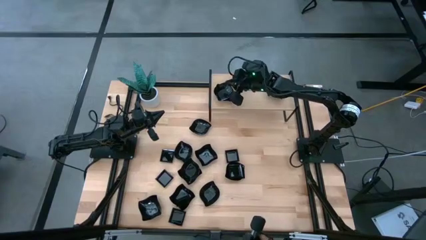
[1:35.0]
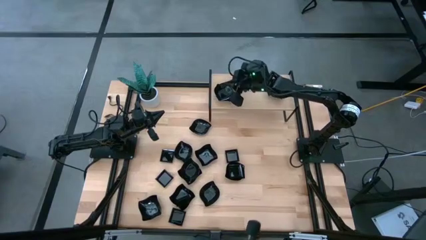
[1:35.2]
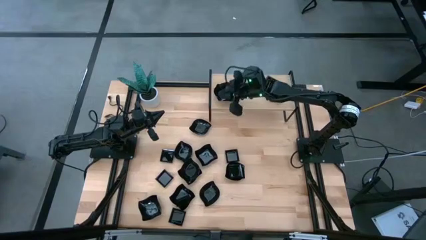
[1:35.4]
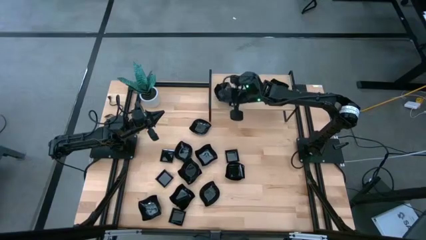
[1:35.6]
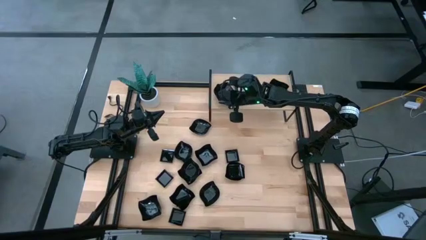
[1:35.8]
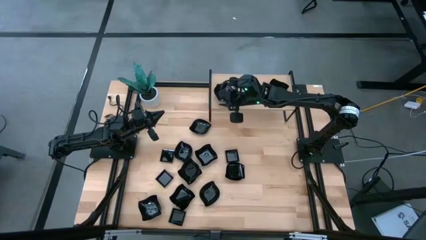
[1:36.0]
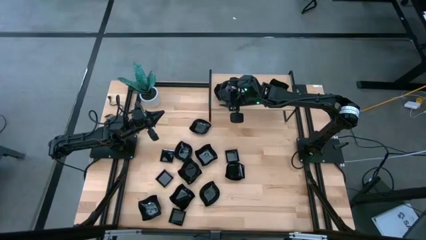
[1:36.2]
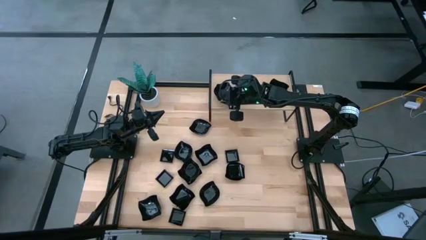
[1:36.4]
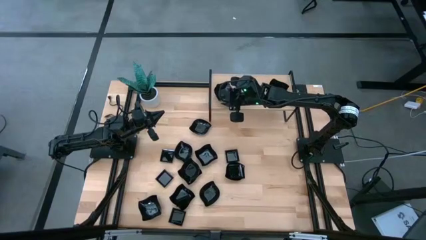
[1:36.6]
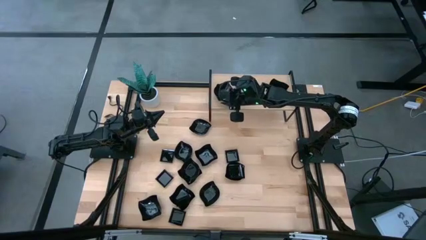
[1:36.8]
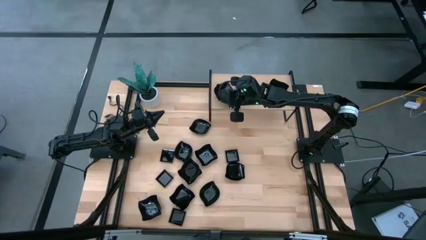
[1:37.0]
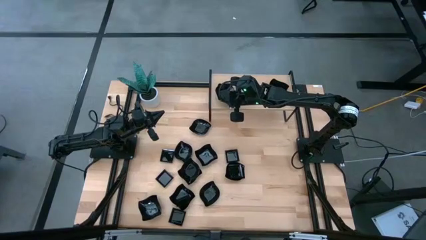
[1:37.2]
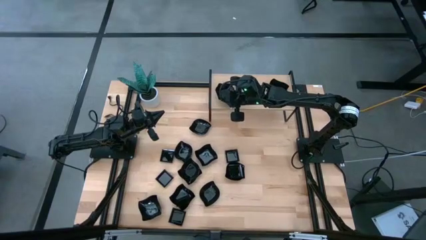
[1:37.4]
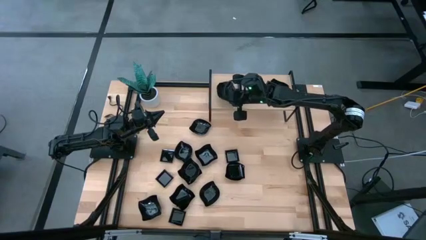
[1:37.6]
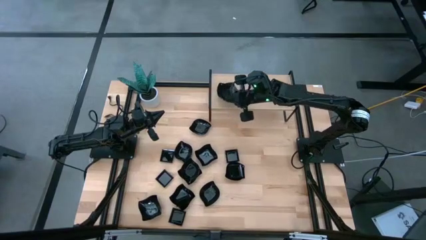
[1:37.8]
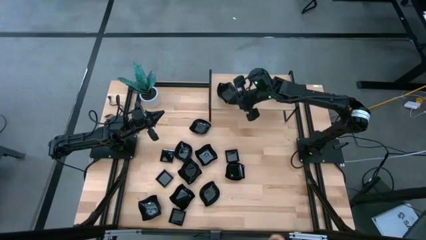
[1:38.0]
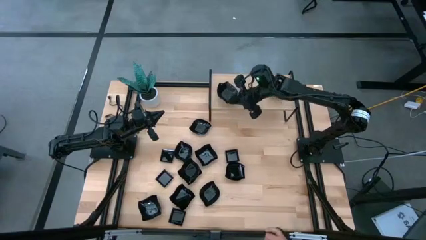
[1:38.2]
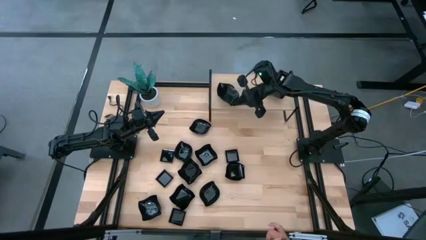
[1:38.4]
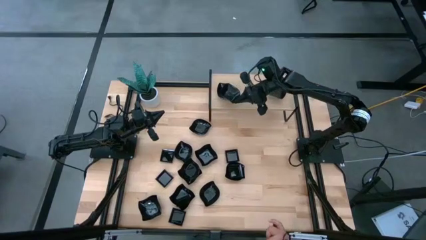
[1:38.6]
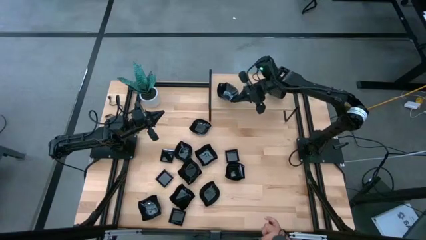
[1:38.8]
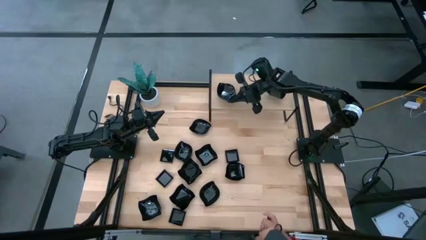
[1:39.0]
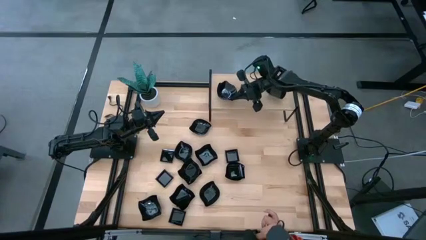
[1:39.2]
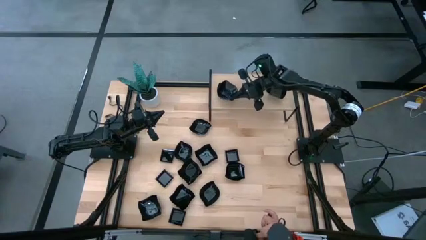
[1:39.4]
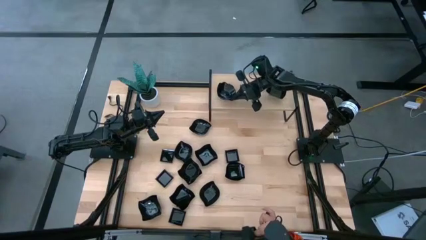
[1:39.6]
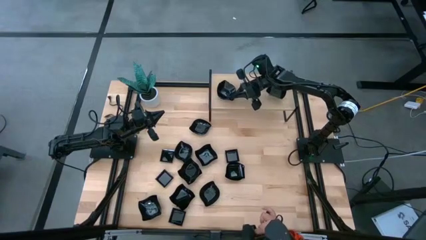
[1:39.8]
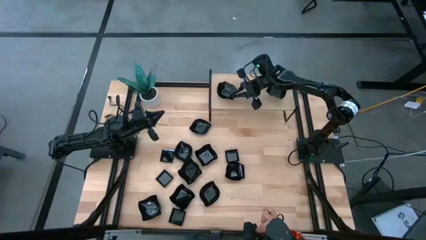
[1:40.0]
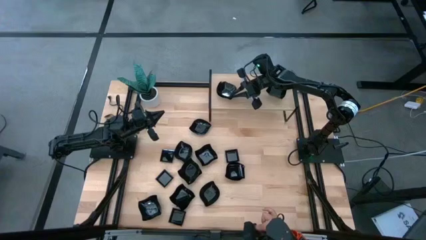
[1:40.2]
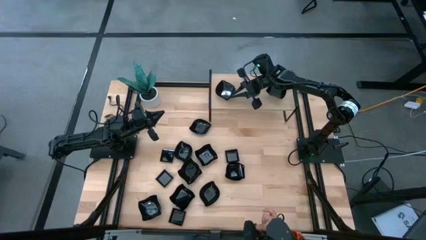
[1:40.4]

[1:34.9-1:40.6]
Task: Pick & Place Mini shaped plates
Stack the black leaf-shaped plate on top of the black leaf-shaped plate on the shelf

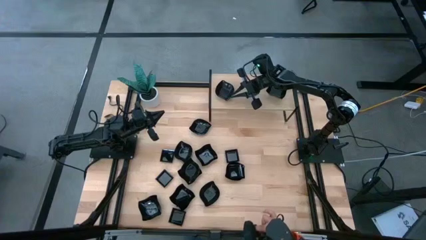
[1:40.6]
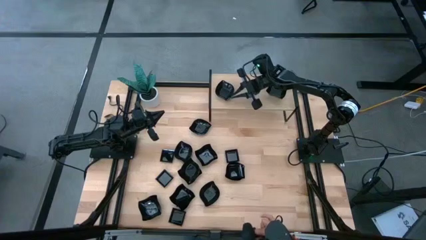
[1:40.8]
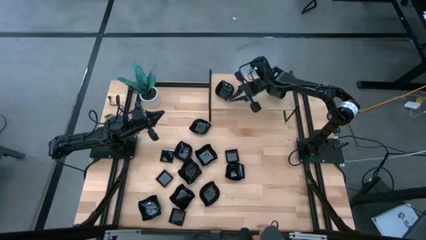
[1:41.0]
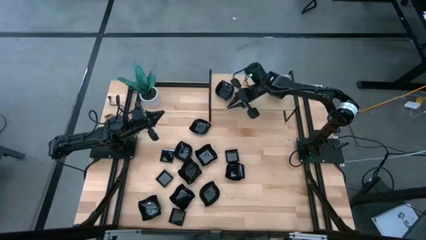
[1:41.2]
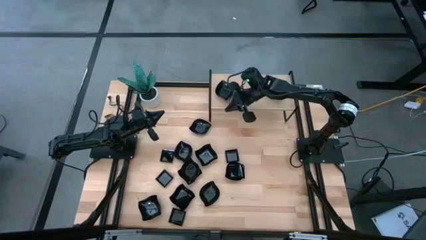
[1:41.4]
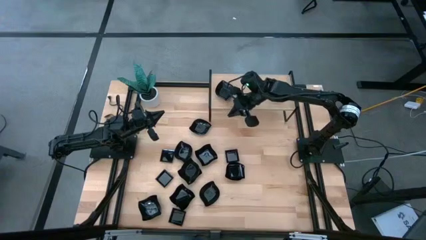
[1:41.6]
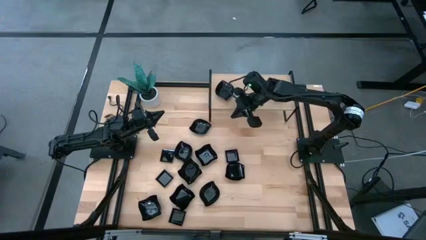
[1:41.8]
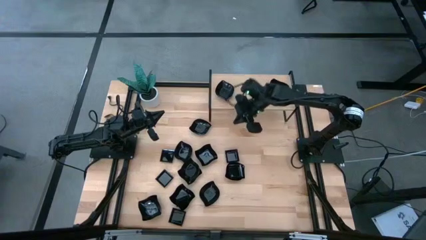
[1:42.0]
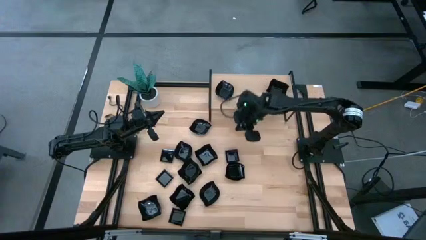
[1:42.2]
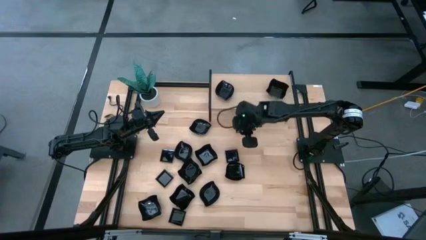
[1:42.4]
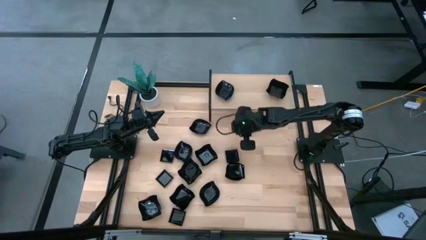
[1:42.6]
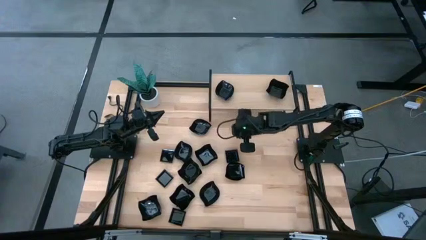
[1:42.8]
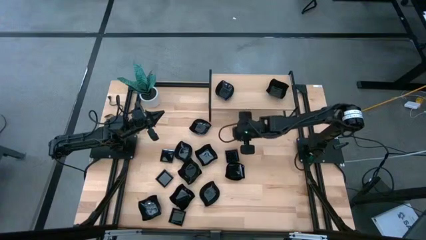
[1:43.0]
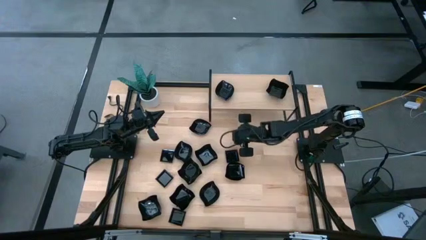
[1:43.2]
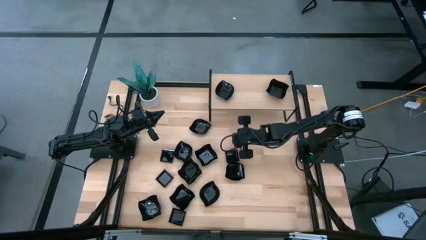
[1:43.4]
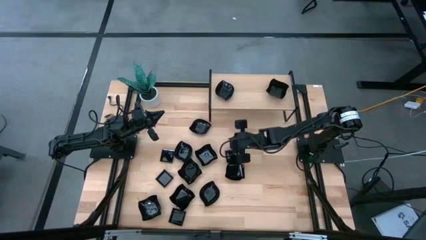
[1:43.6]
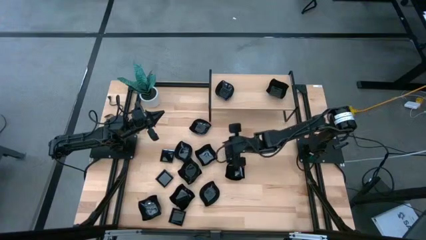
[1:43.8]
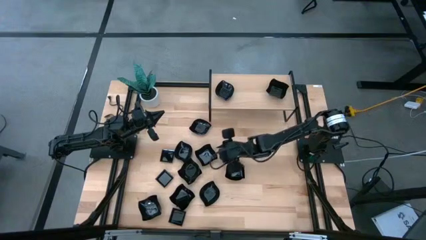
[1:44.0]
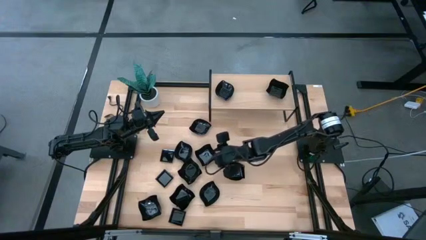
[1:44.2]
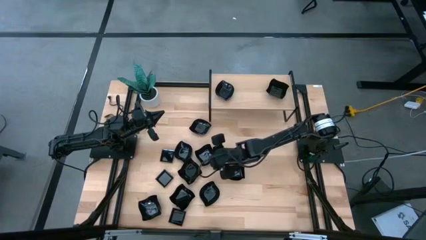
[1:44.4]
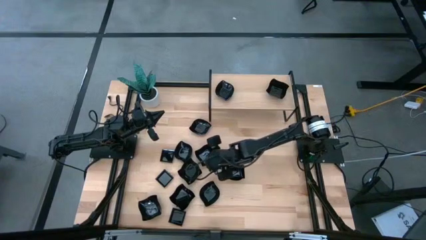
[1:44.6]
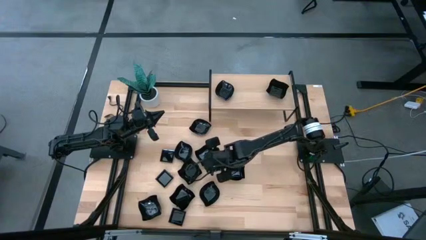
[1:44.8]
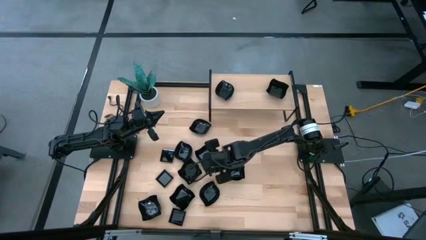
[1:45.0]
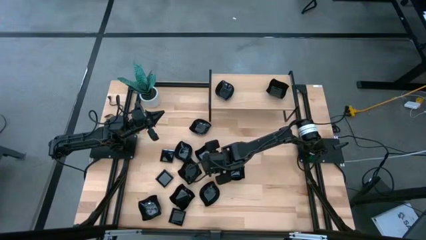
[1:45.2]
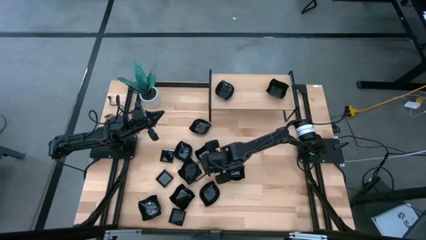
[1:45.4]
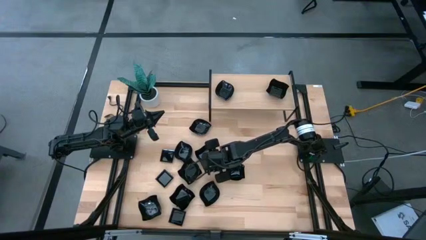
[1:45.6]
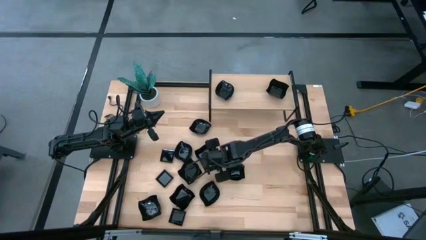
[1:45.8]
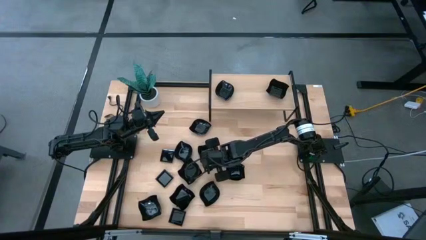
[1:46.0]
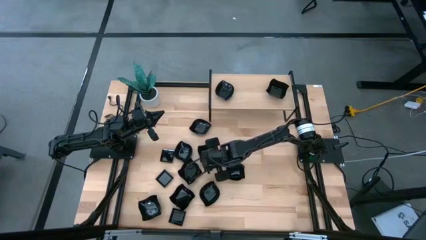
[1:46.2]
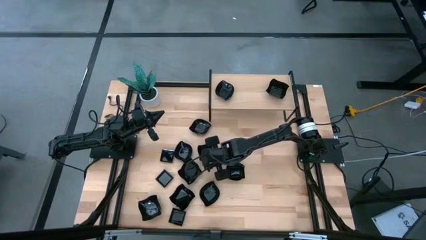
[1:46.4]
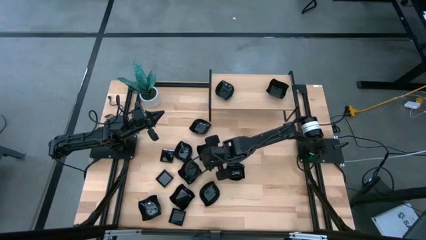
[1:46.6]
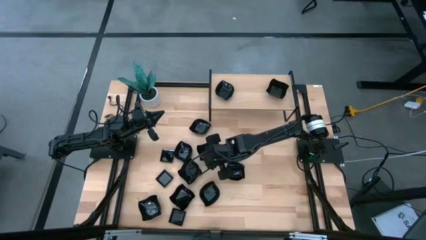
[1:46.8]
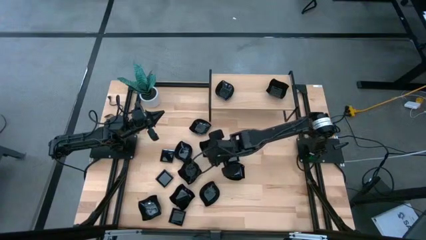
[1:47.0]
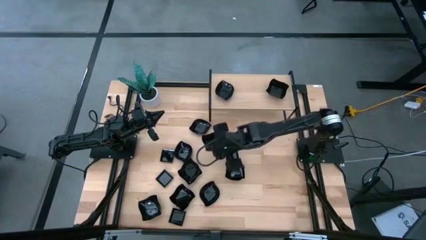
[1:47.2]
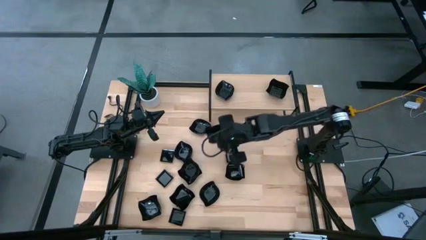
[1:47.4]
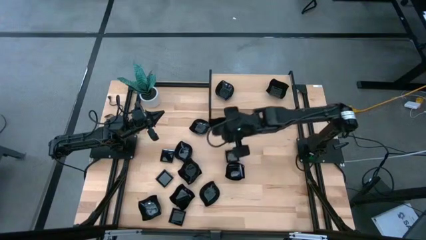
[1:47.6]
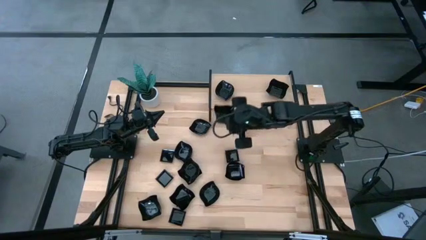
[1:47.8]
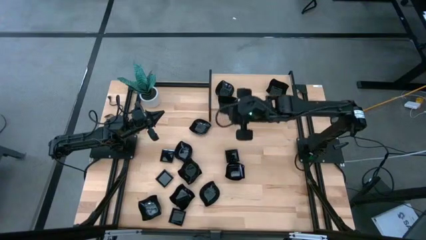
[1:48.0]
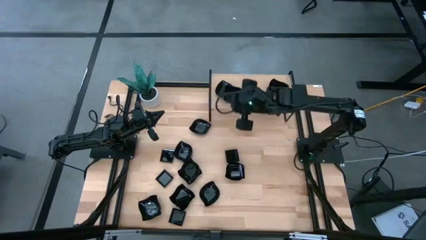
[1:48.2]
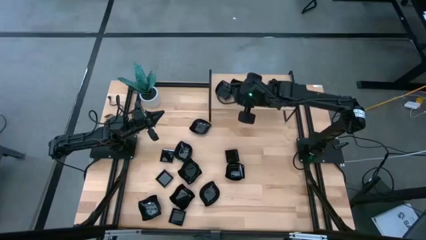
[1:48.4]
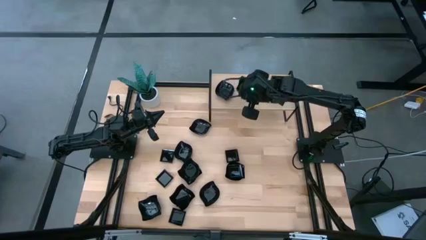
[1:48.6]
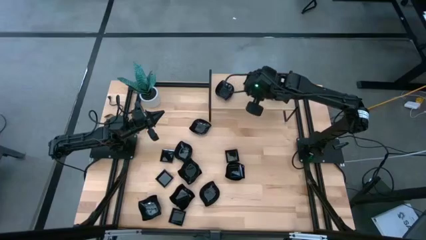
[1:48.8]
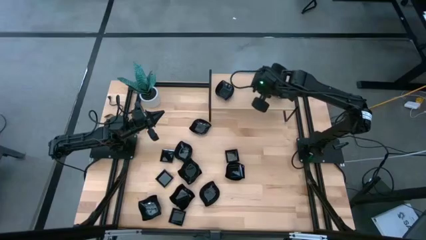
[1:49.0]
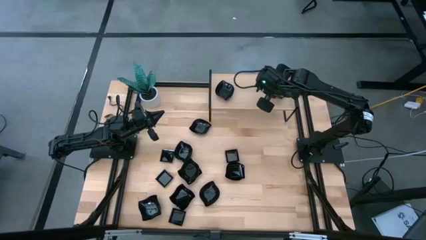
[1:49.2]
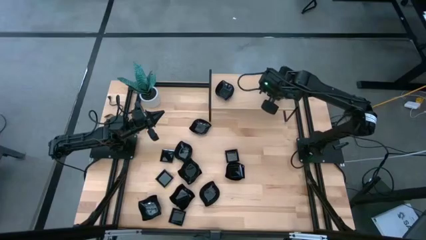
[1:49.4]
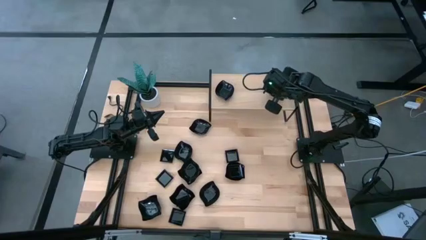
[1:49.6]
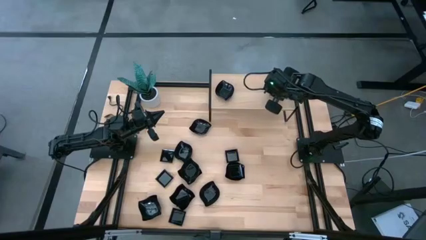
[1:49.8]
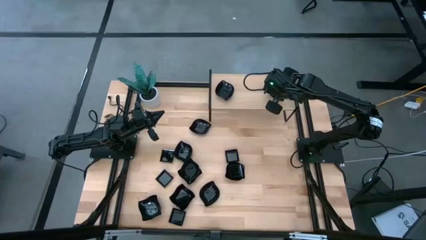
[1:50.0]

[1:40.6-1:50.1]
Stack the black distorted square plate on top of the black distorted square plate on the shelf
